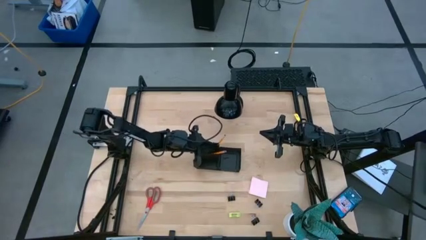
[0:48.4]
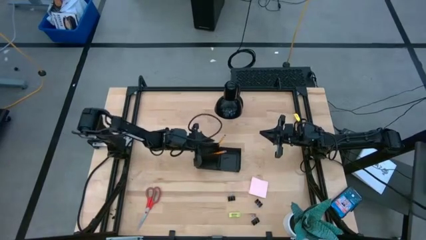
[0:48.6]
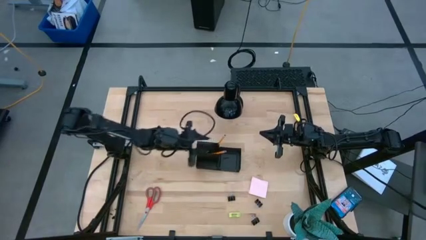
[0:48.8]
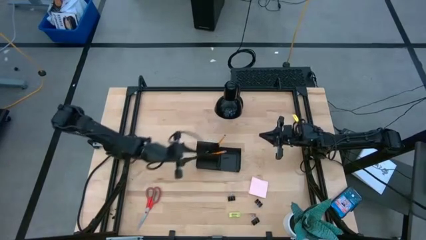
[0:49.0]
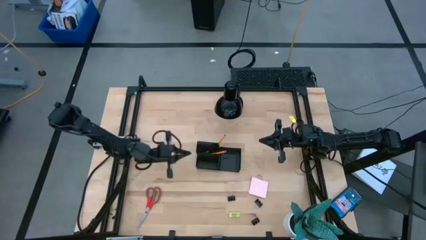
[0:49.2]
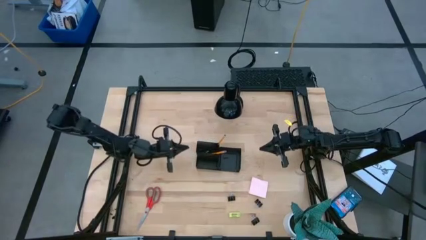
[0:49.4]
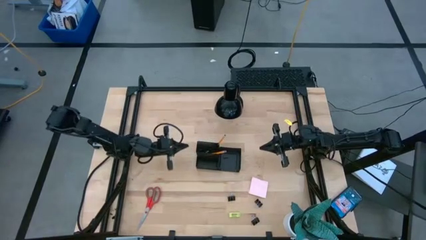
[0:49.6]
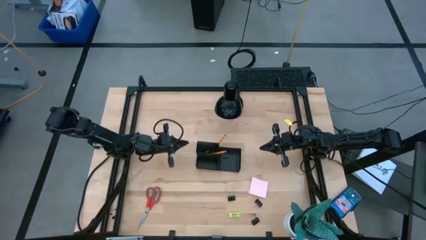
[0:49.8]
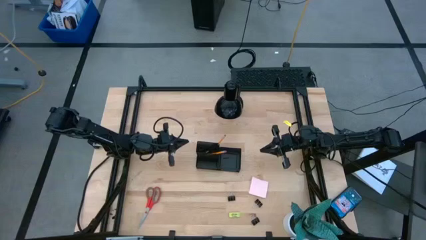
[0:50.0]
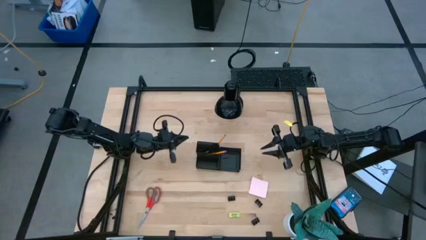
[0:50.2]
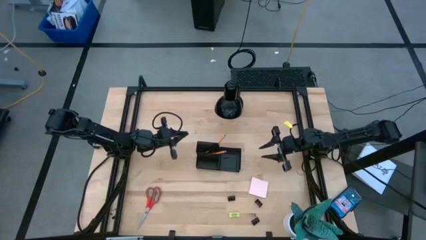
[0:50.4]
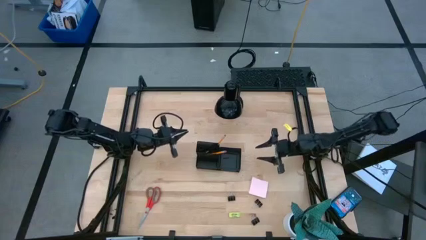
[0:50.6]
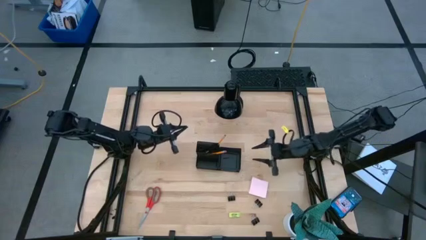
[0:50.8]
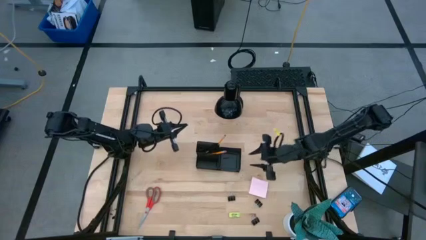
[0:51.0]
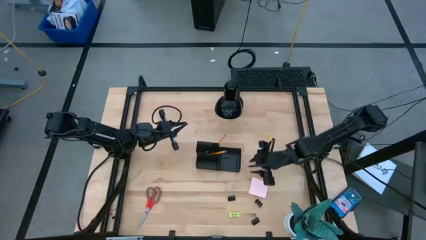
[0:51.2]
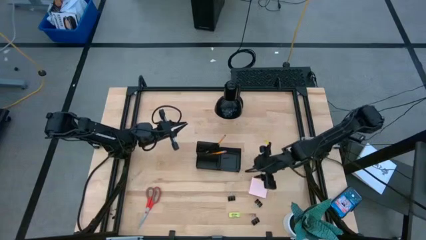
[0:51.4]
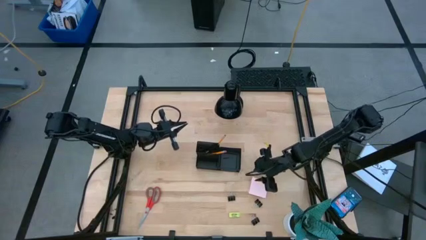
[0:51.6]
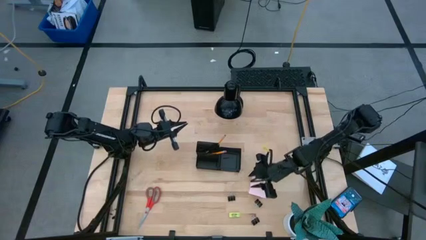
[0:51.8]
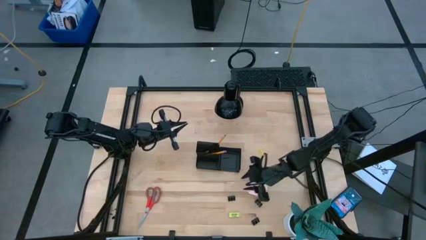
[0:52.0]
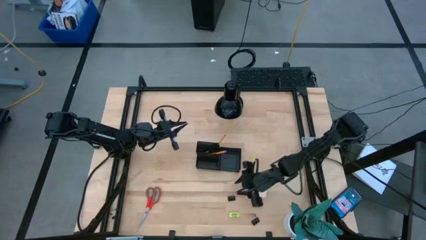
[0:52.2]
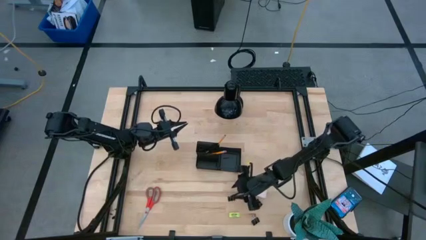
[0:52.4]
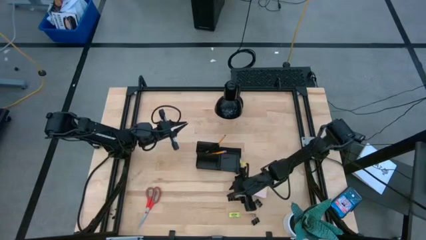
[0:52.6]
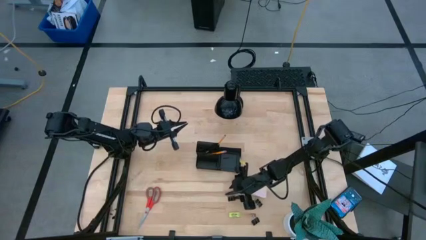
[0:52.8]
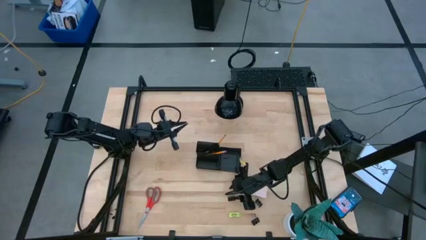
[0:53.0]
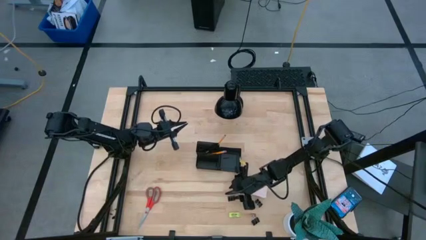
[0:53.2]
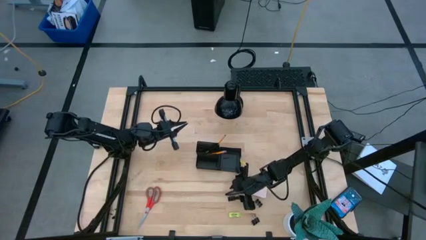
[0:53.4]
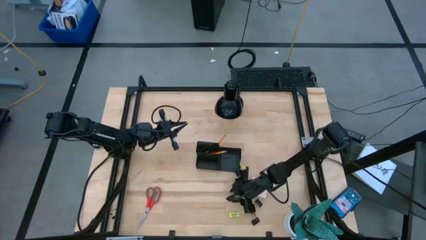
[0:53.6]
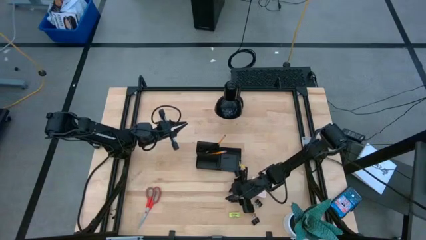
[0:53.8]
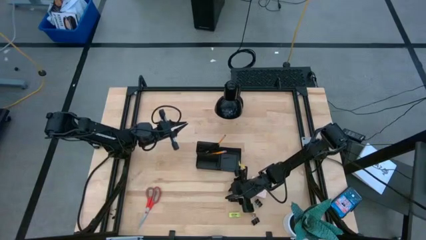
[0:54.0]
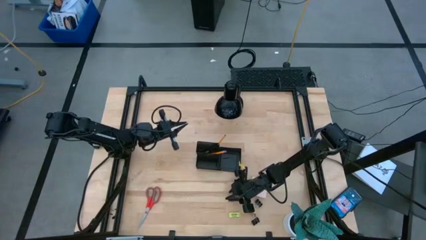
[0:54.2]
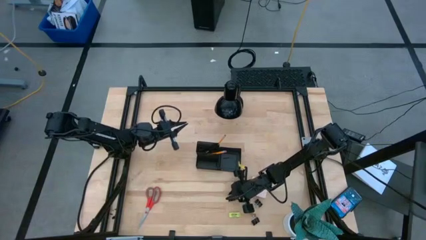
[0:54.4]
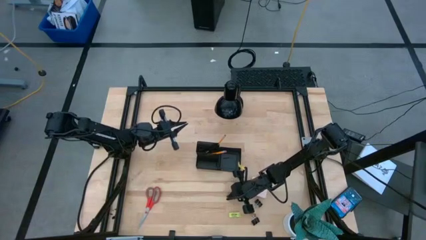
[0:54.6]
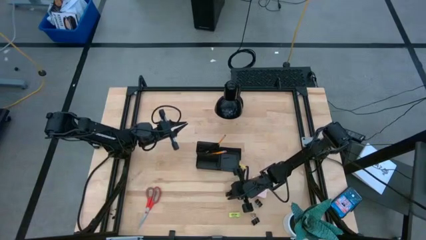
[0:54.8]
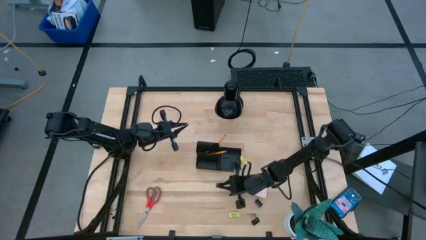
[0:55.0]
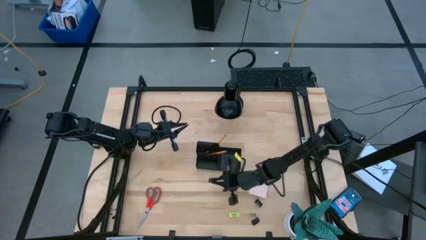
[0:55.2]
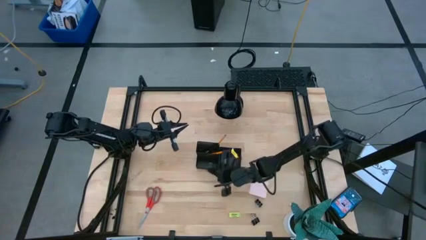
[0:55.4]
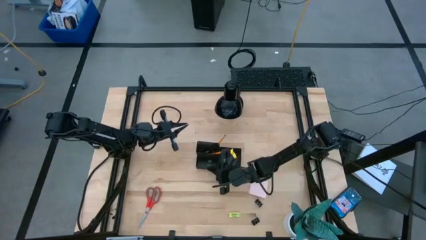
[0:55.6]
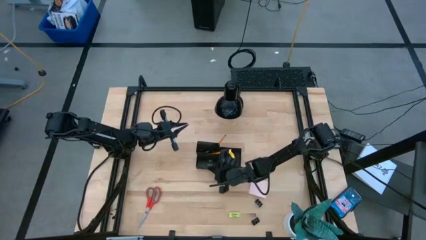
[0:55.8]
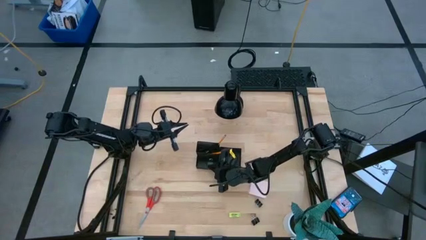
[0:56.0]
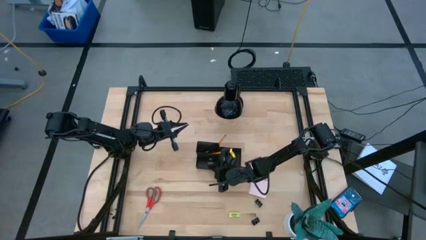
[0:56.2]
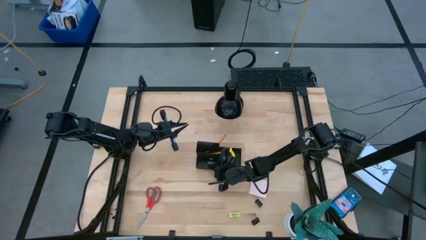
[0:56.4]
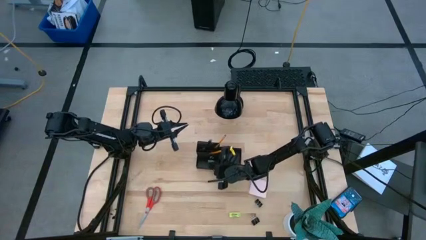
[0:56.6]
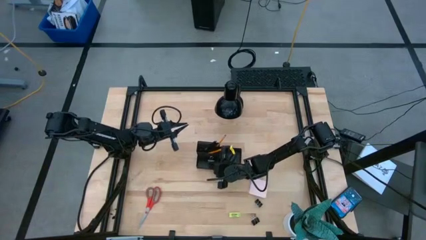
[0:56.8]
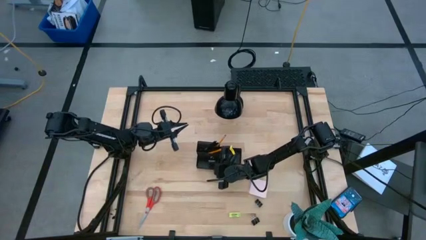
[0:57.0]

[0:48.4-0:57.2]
Task: Pick and place office supplies into organizer
Put the black binder clip into the black desk organizer

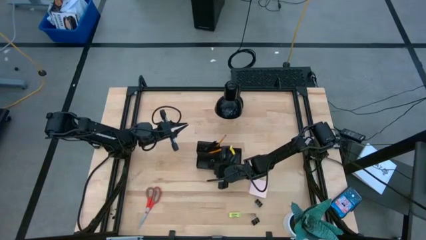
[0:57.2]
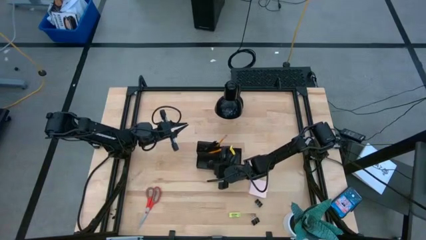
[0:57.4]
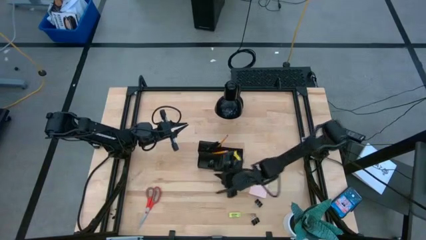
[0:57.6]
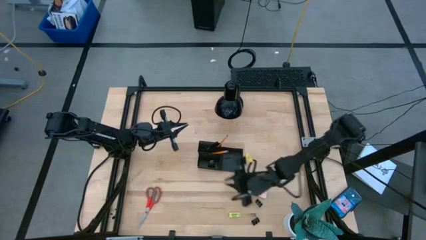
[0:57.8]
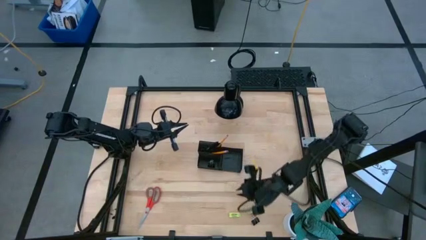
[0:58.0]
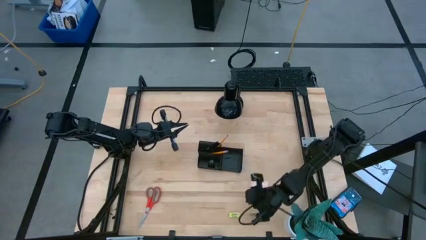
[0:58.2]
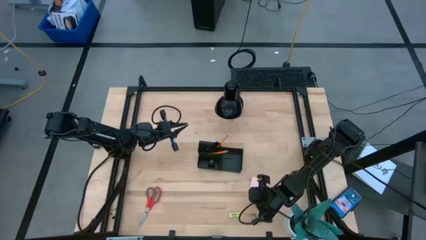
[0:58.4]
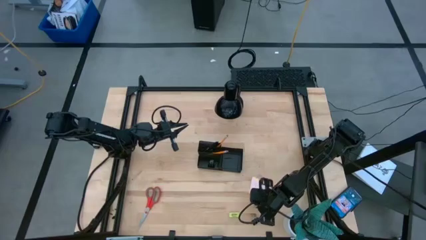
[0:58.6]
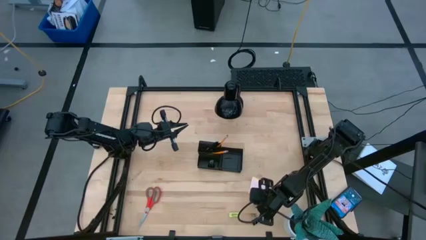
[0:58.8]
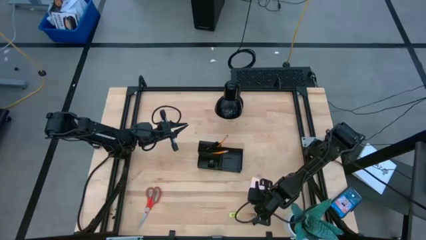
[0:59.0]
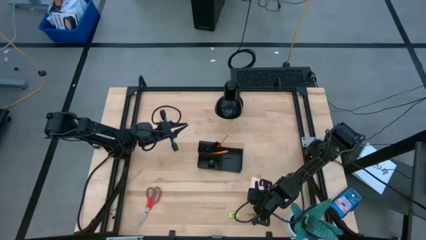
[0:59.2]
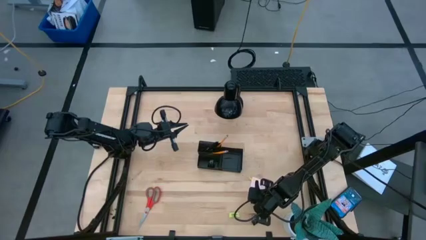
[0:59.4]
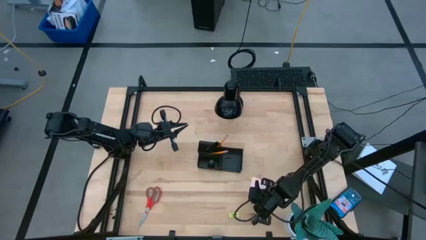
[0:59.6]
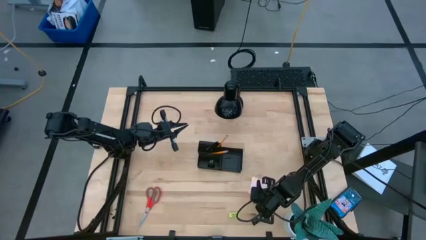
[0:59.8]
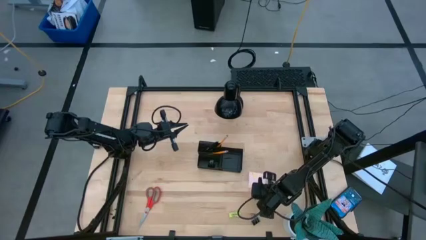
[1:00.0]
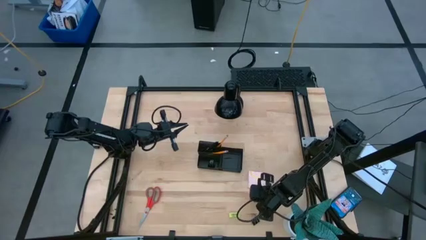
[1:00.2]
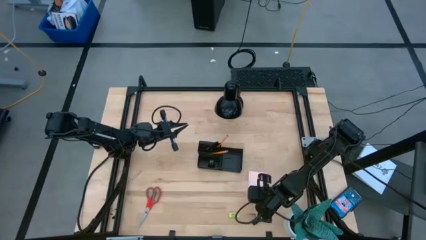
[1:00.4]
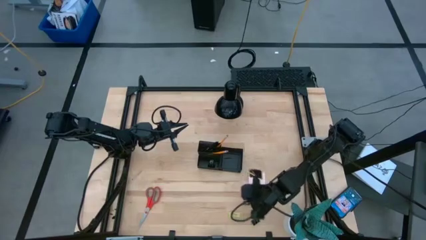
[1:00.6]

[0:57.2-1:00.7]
Put the black binder clip into the black desk organizer

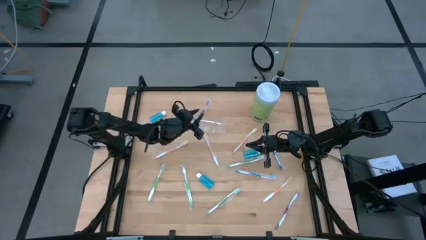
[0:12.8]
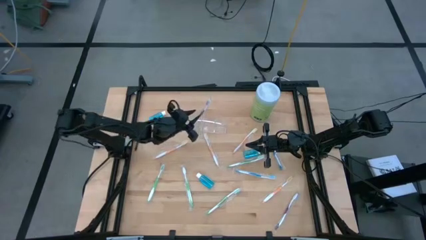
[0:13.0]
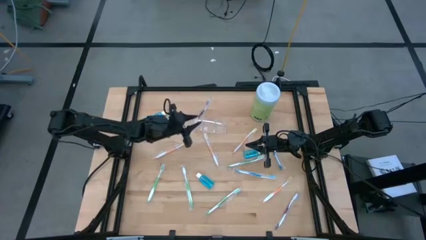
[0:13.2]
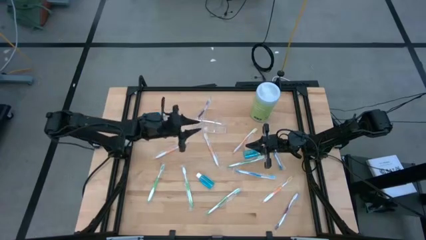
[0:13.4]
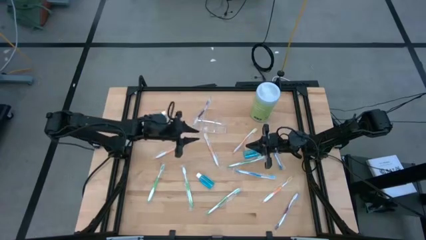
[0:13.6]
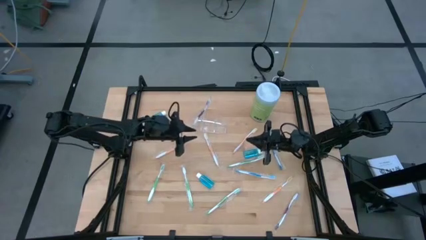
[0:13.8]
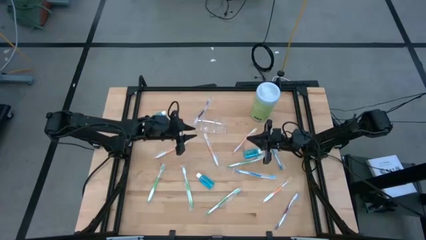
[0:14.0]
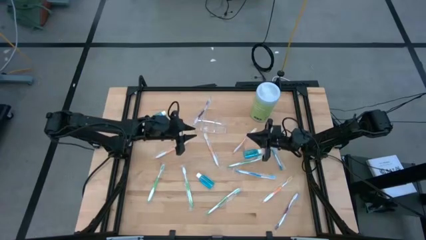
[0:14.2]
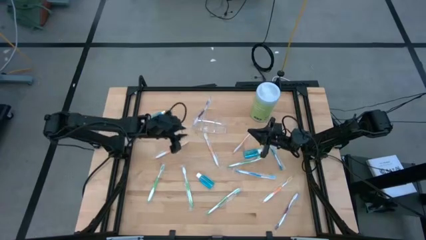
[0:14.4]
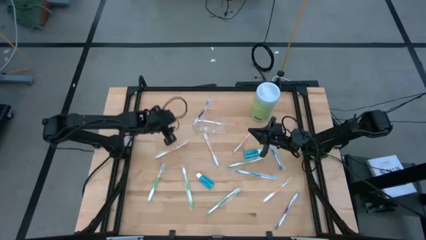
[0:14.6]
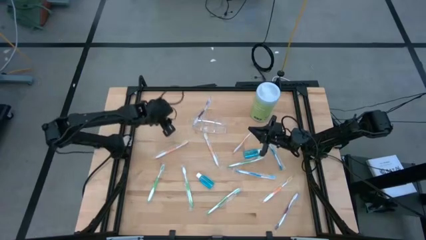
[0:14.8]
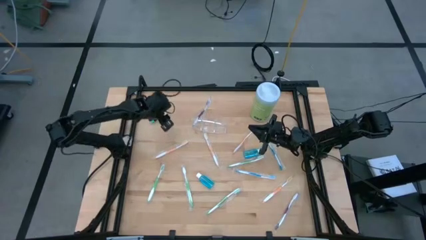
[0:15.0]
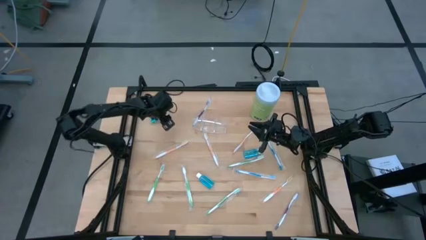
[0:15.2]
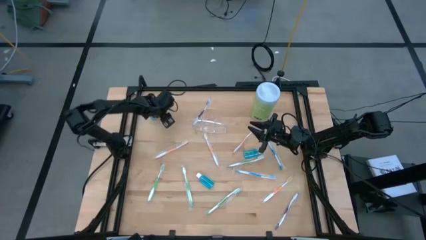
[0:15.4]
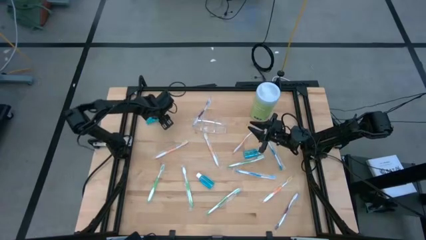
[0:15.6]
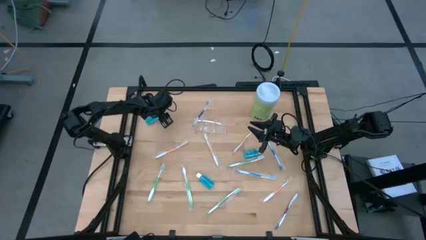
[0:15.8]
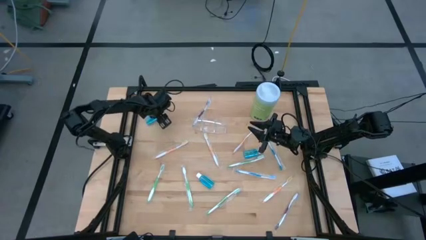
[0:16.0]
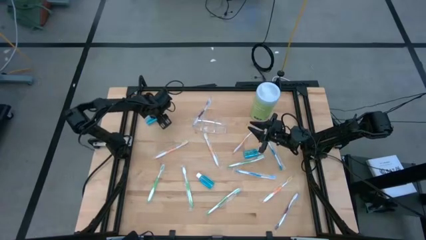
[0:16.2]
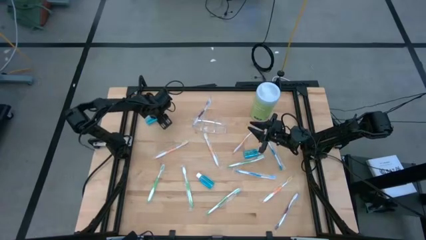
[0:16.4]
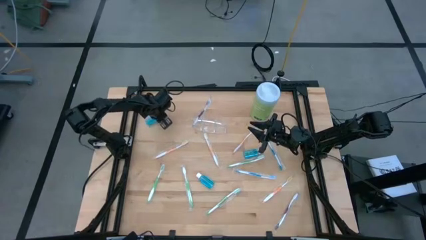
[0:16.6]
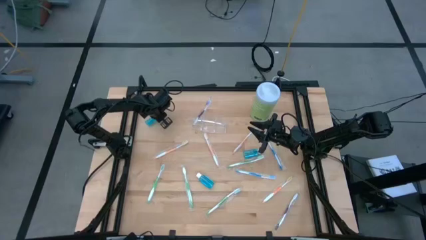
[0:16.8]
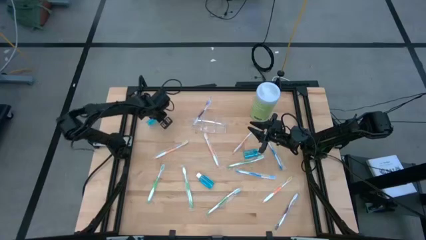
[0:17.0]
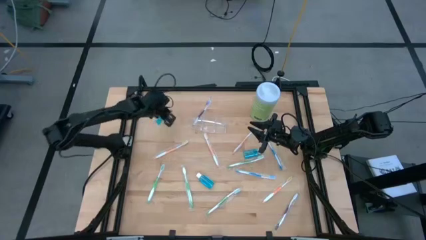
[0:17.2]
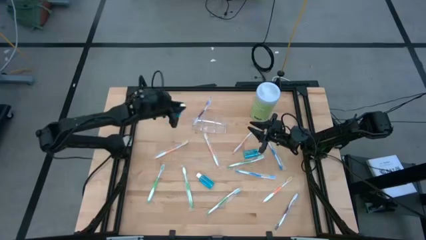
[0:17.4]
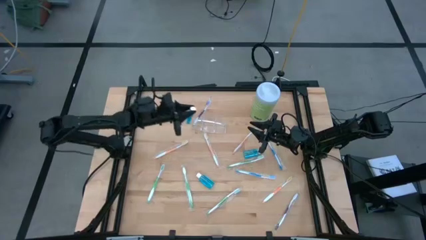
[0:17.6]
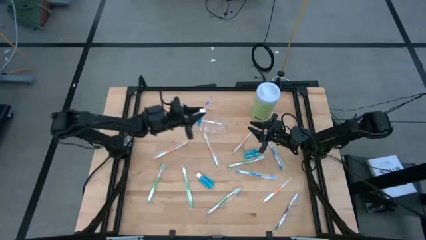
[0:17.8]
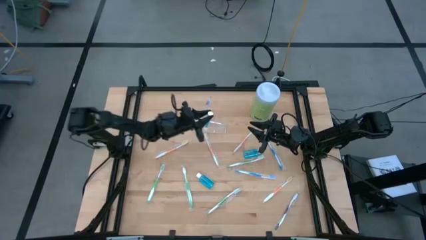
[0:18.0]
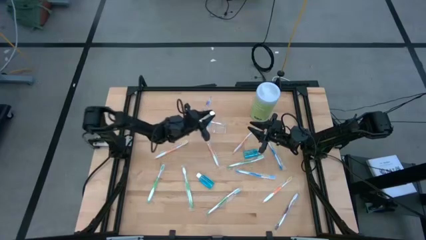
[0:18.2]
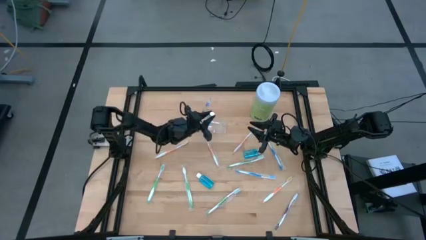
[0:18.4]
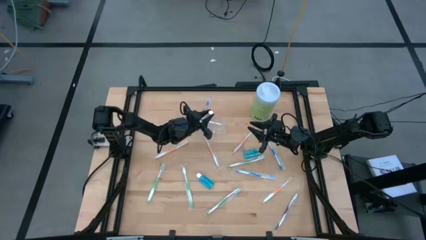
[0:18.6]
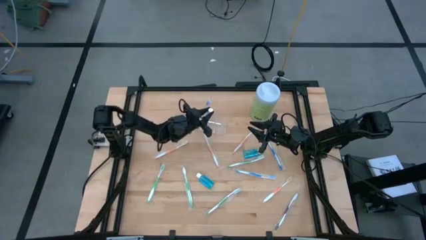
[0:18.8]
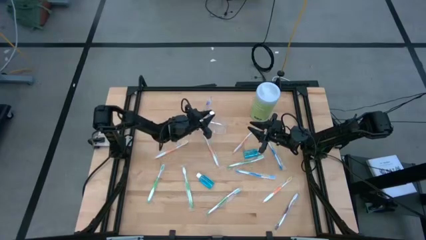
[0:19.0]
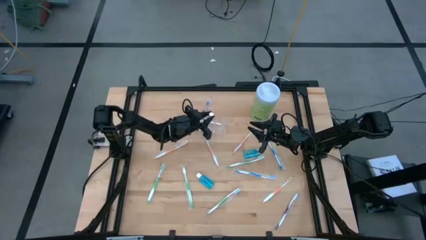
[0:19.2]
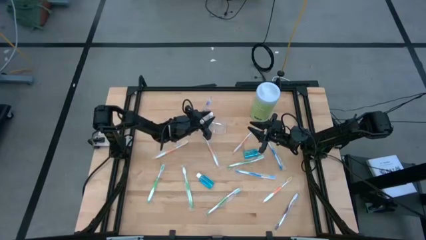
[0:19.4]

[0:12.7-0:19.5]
Task: Pick & Place toothbrushing station
Put the blue mouthwash into the transparent organizer
